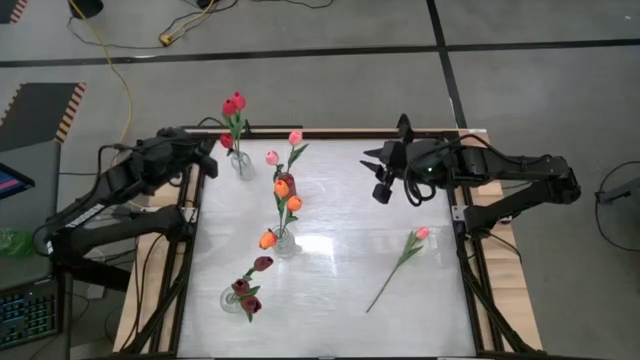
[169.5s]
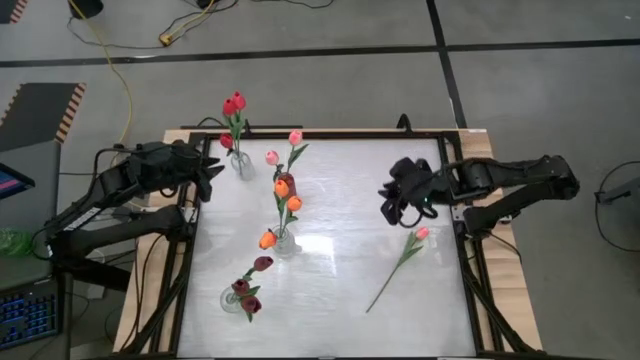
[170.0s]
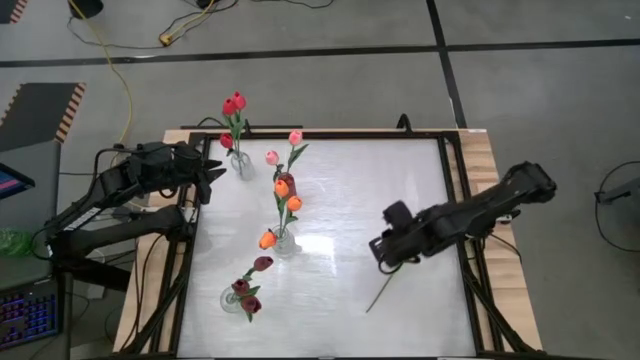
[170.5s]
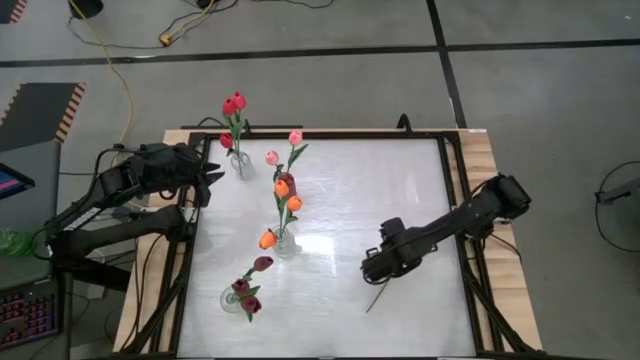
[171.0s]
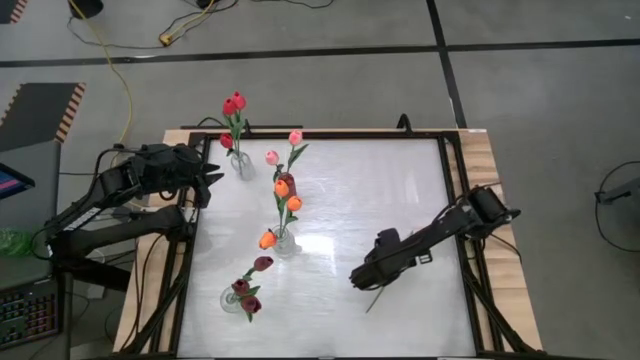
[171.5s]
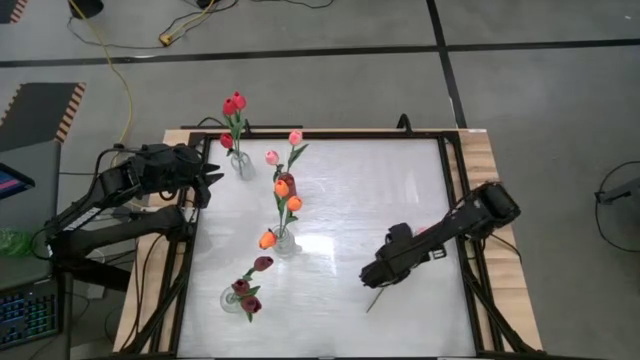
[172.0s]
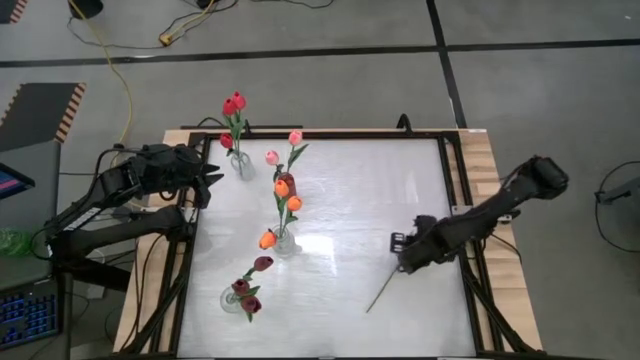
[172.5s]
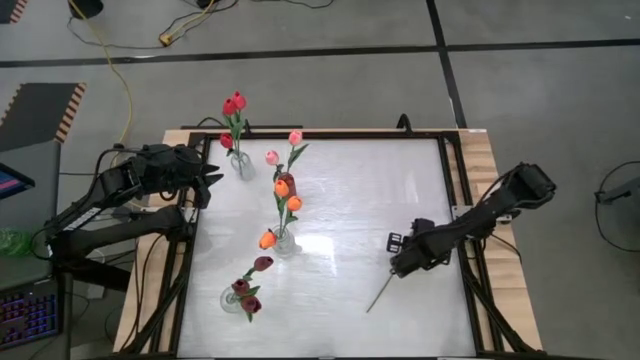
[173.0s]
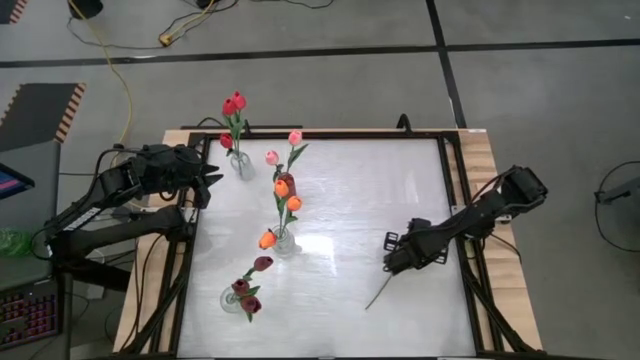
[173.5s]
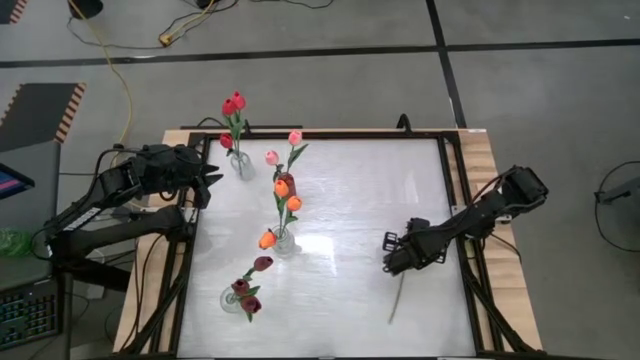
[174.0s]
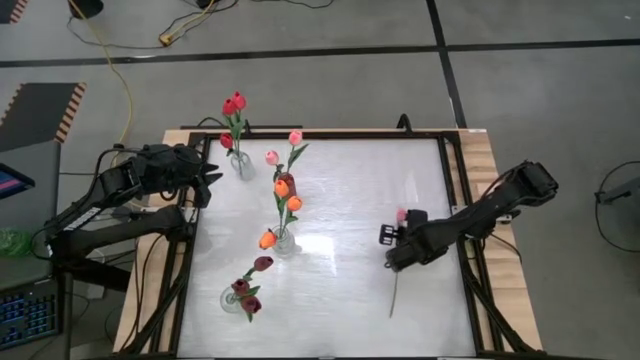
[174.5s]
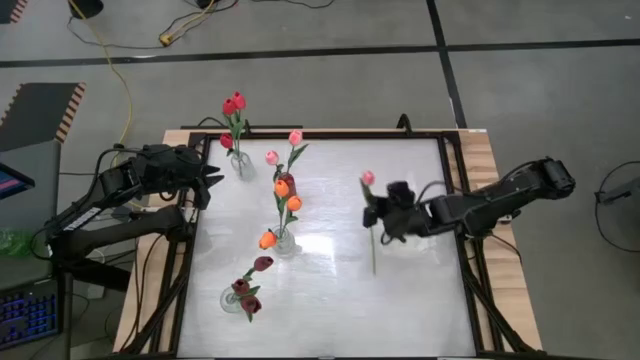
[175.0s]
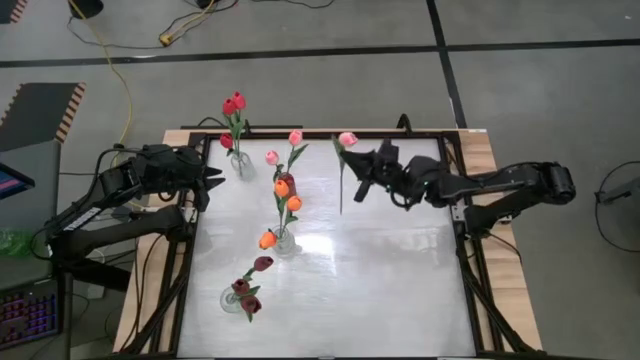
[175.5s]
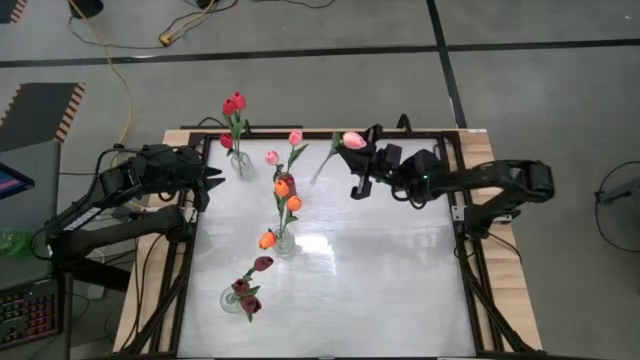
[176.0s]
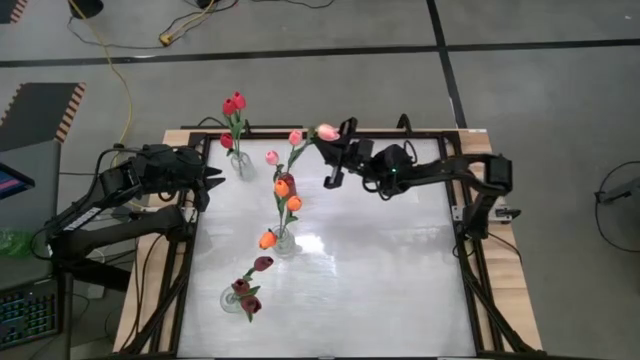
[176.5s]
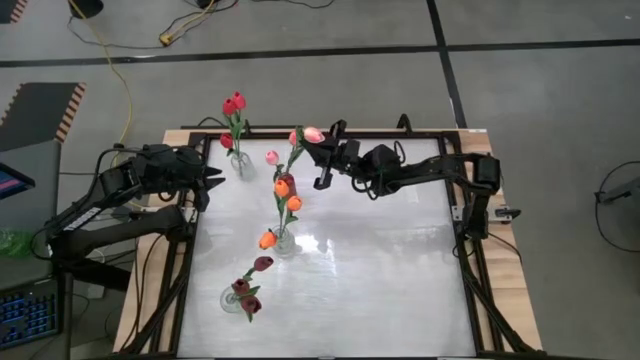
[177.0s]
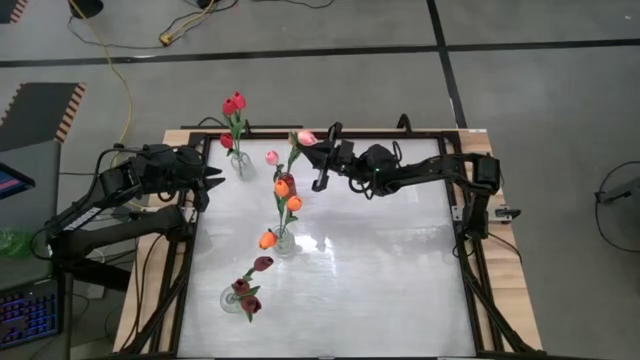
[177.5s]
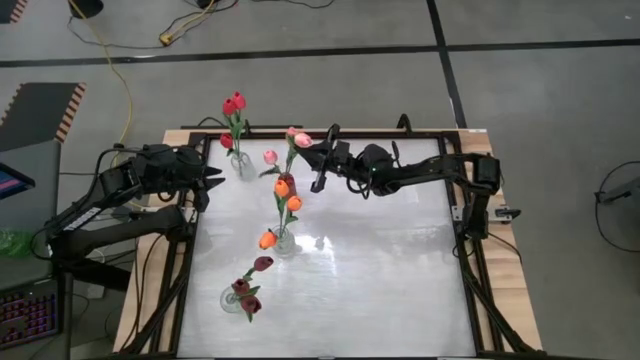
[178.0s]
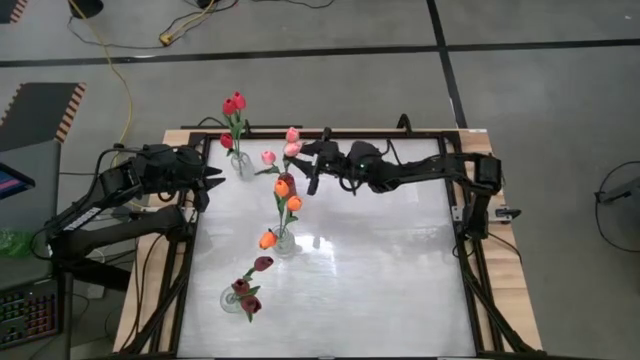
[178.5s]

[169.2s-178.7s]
Task: Sort flowers into vase by color
Put the pink tulip into the red vase

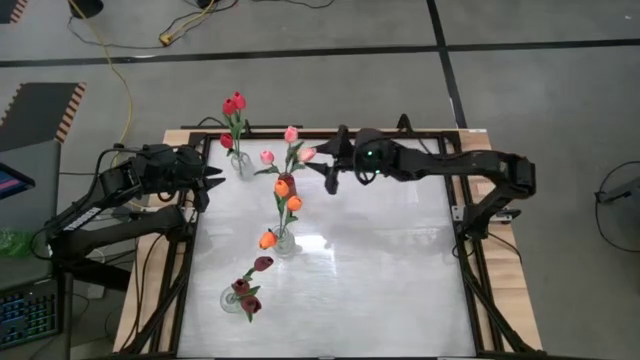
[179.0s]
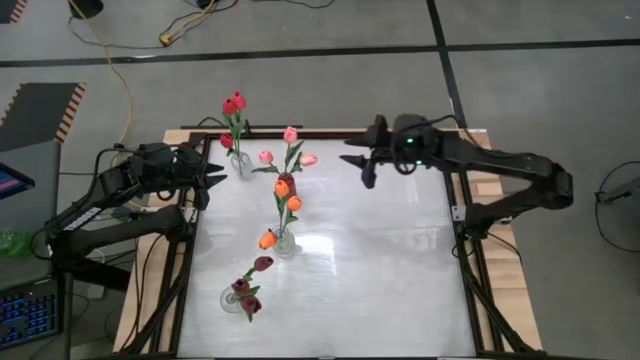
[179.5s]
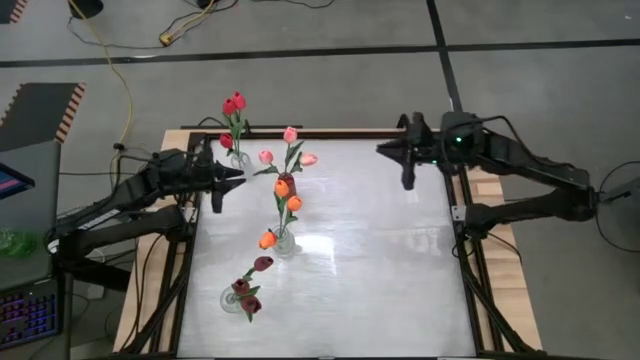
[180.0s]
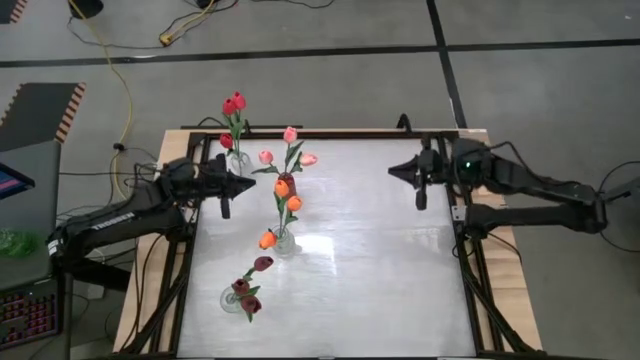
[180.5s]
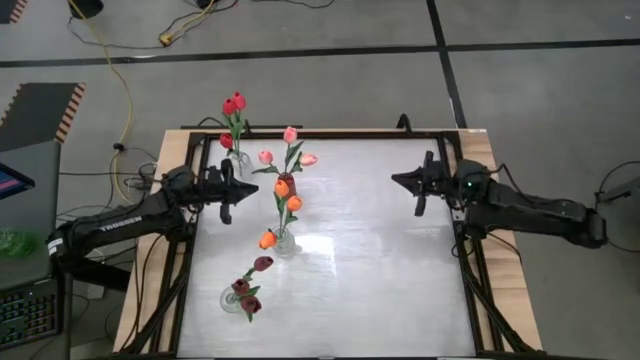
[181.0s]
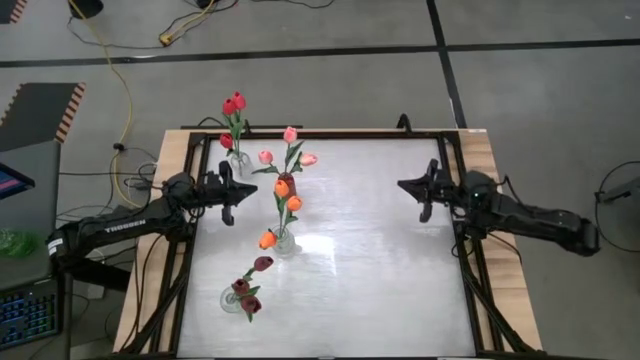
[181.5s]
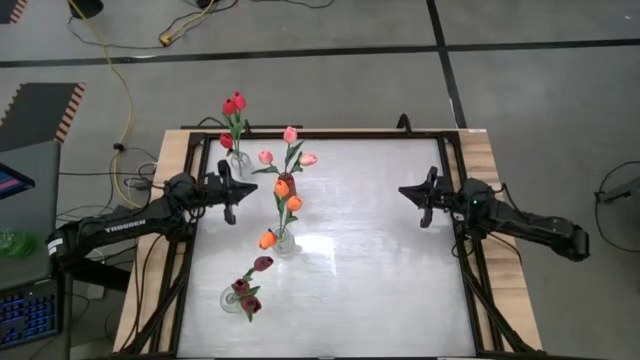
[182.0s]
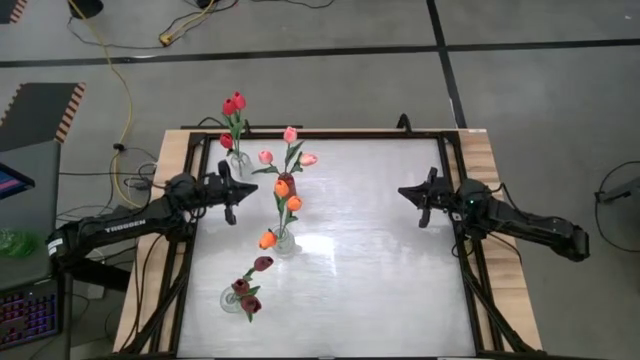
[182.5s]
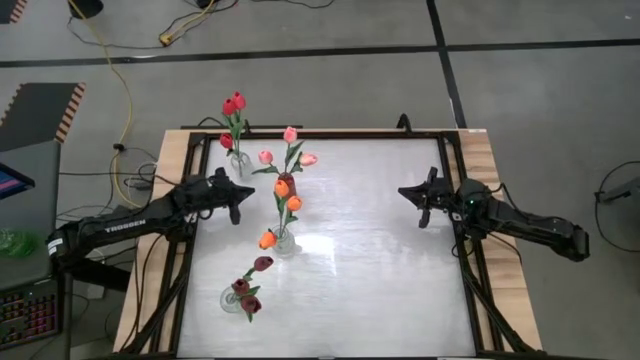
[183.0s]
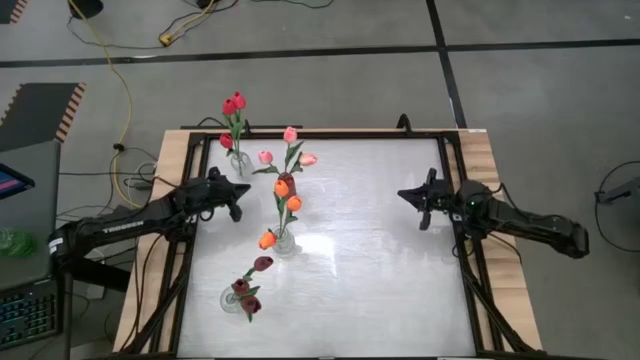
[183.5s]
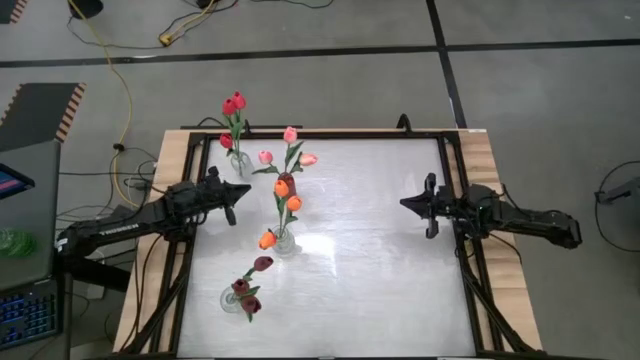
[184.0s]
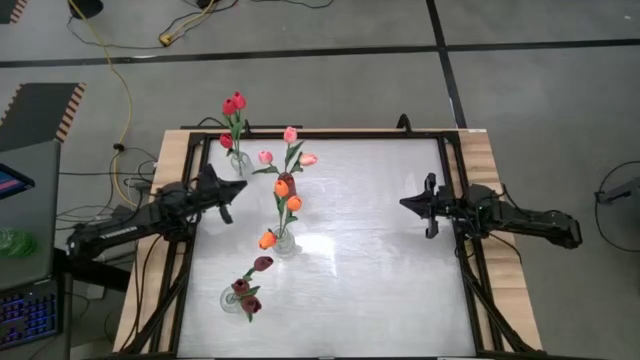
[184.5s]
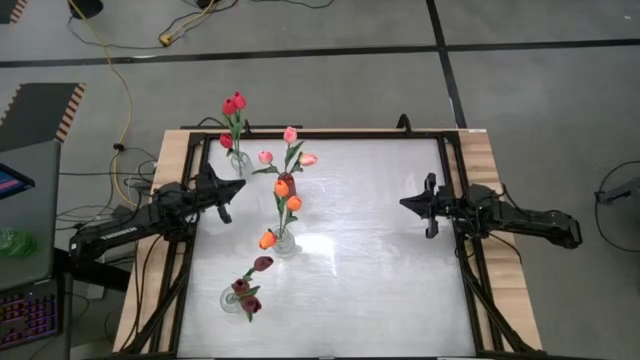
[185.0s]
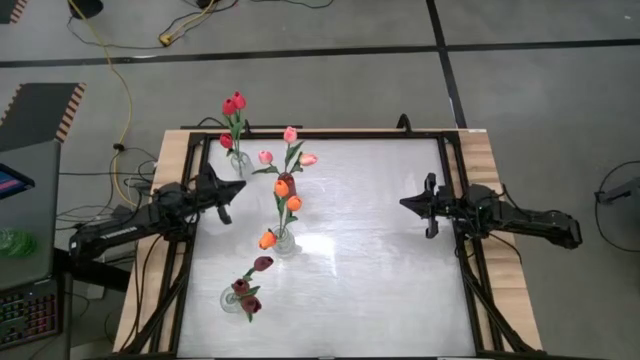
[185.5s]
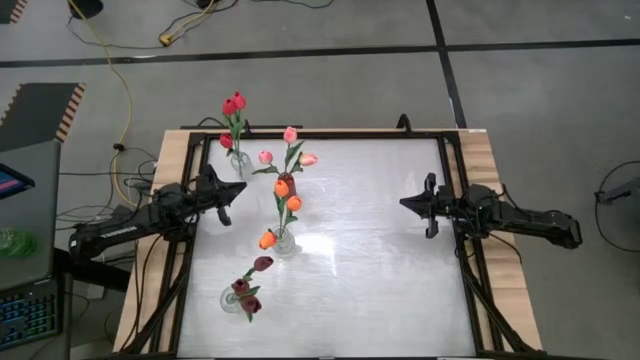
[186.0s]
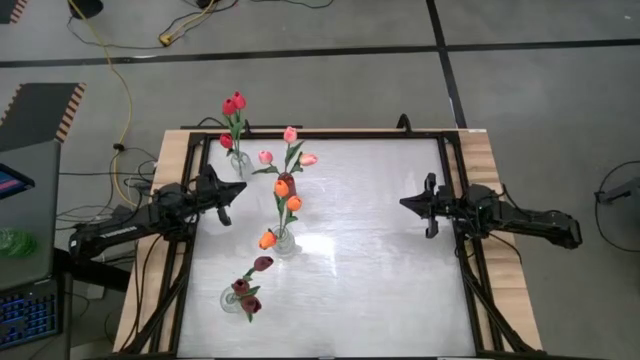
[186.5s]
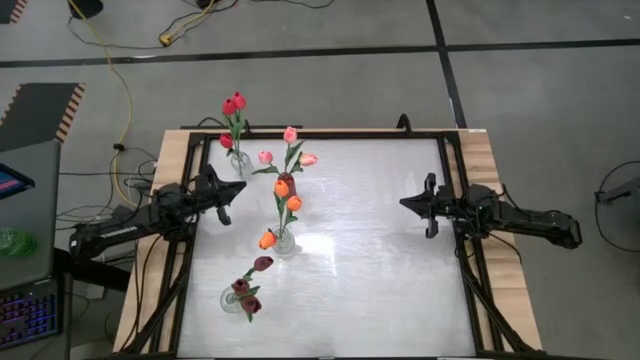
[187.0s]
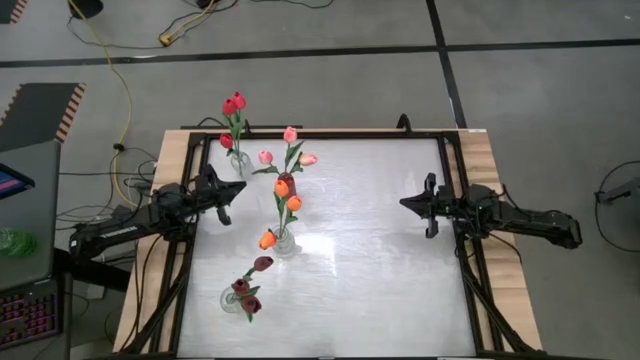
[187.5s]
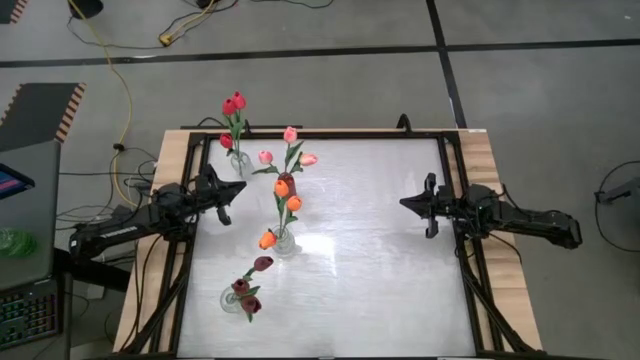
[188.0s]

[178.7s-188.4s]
Return to Home Position

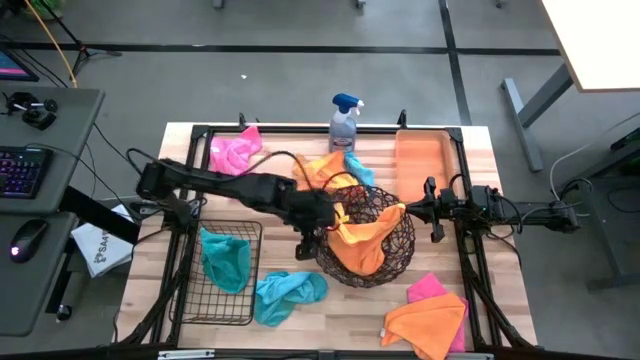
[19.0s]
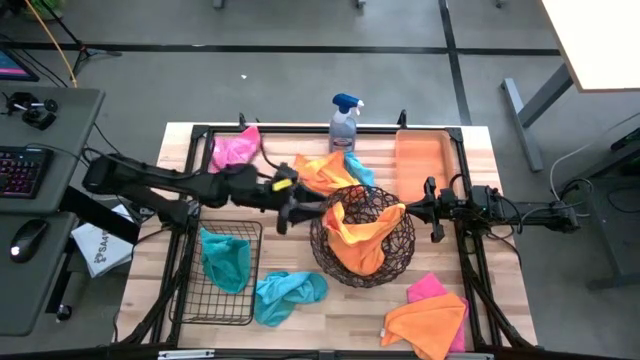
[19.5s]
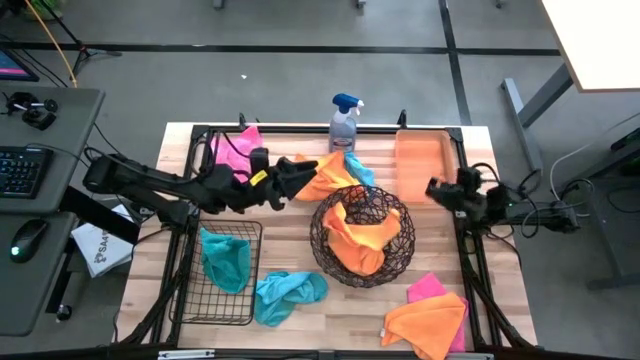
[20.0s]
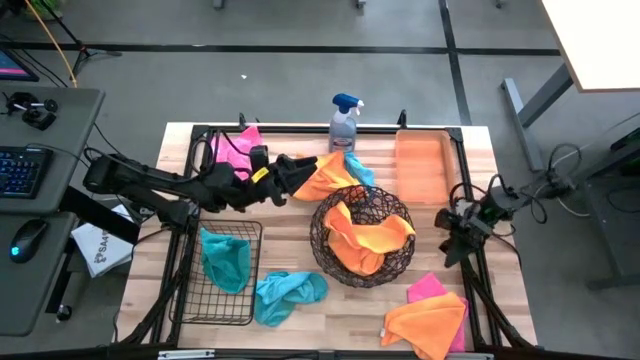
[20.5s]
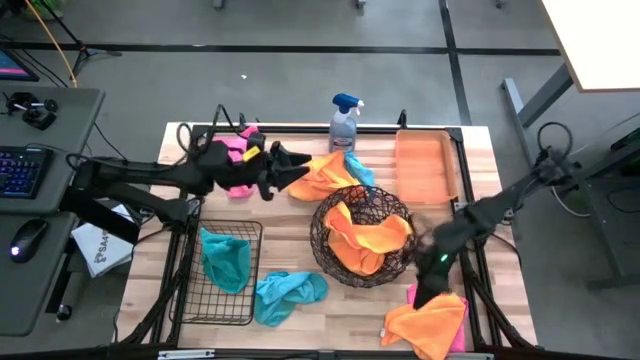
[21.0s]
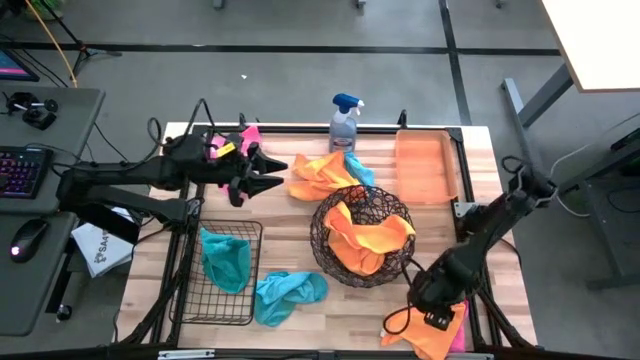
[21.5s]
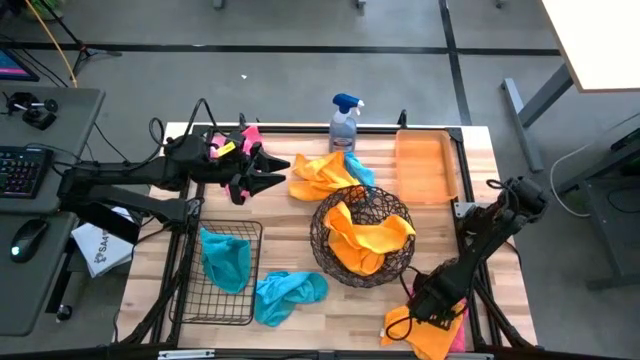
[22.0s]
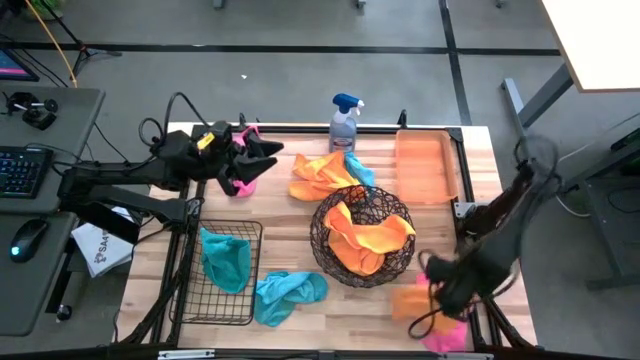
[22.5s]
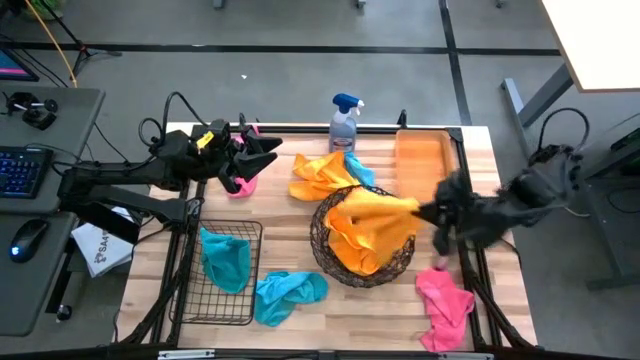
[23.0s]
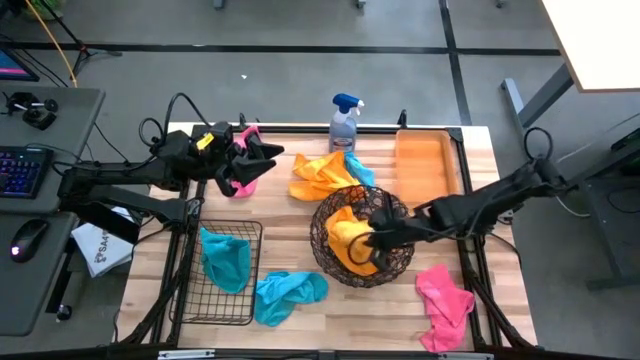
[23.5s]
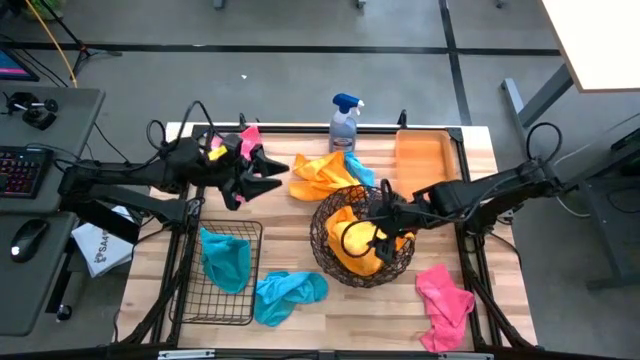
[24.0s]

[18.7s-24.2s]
Task: Sort microfiber towel by color & place in baskets
Put the bottom orange microfiber towel into the woven basket
